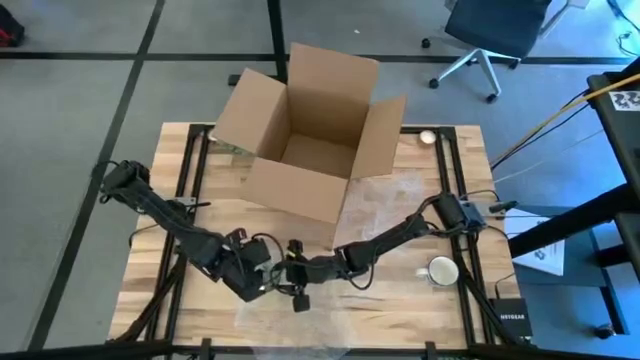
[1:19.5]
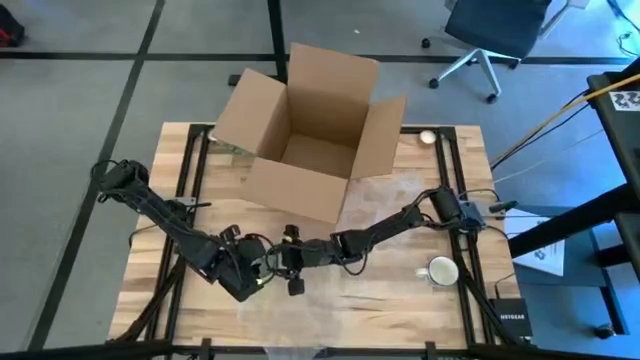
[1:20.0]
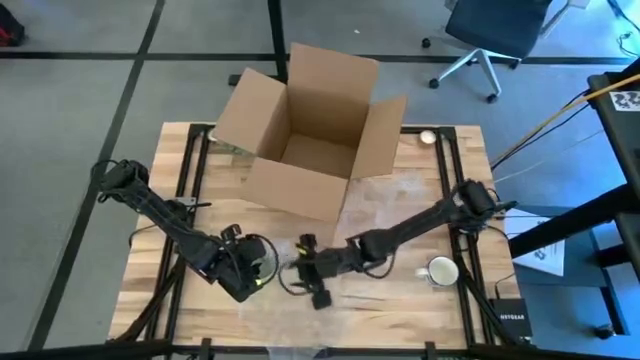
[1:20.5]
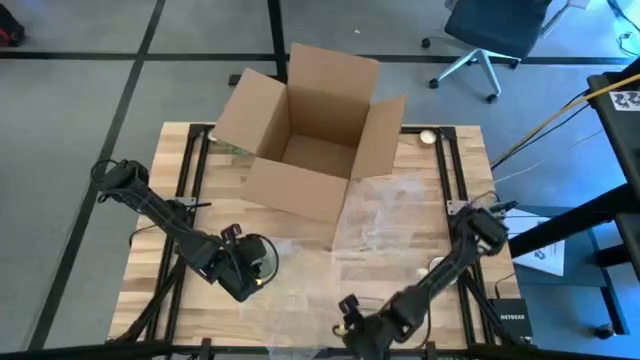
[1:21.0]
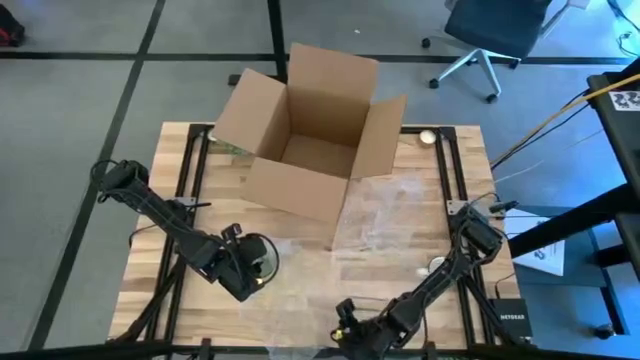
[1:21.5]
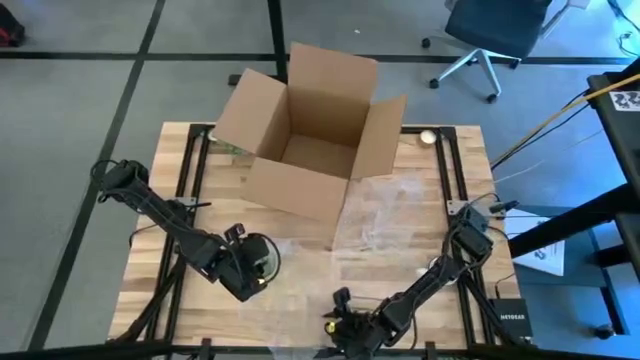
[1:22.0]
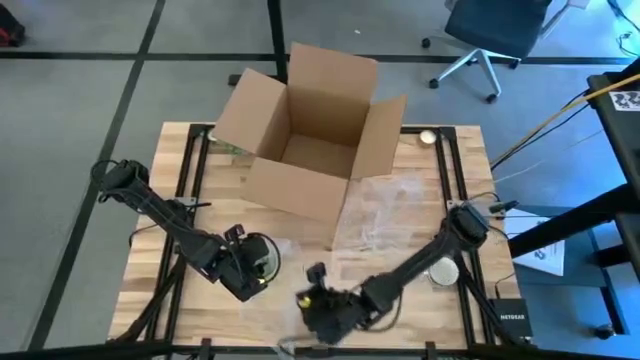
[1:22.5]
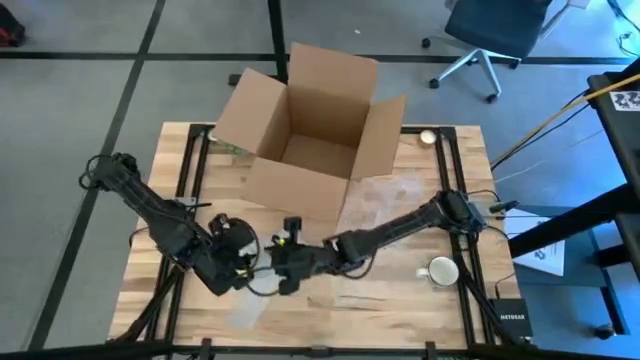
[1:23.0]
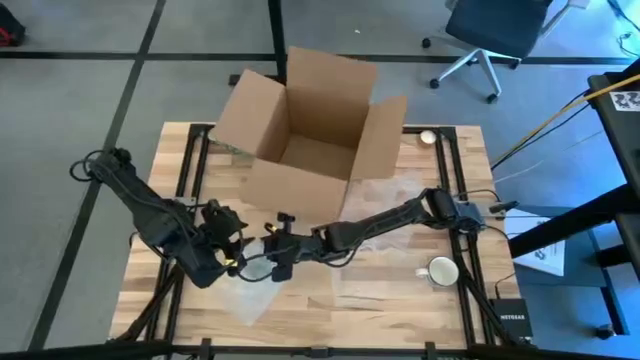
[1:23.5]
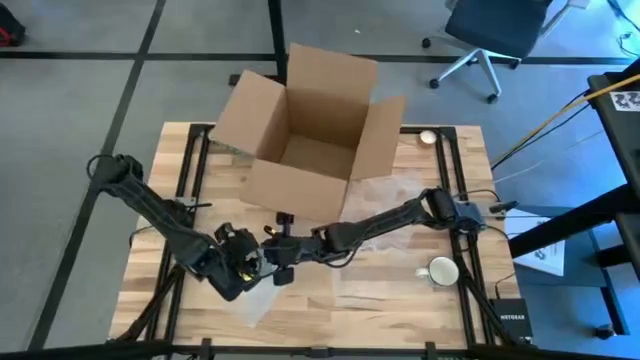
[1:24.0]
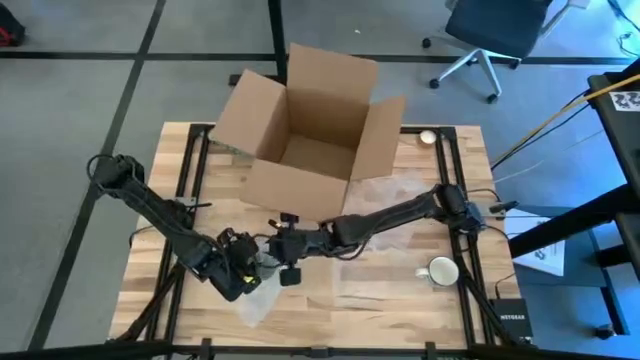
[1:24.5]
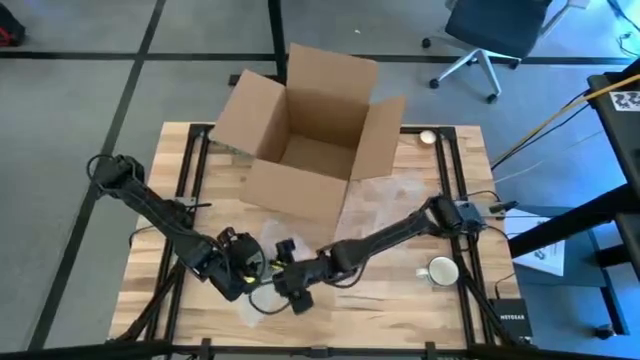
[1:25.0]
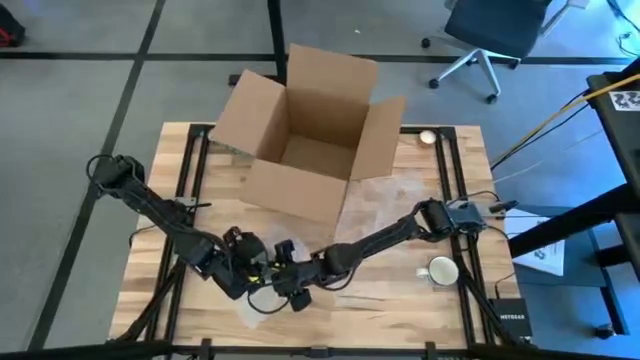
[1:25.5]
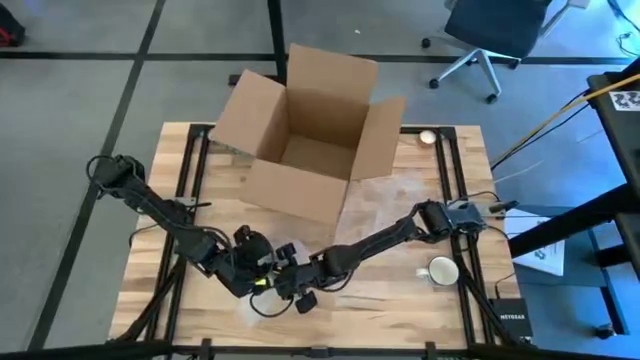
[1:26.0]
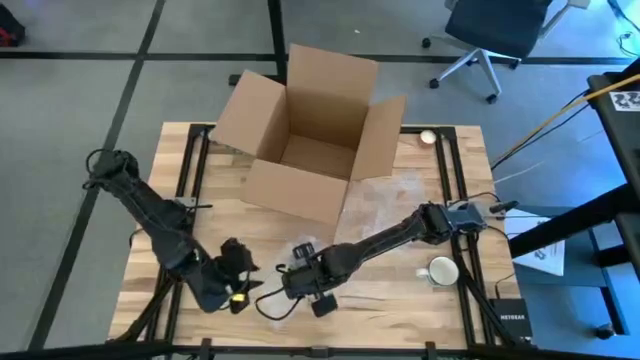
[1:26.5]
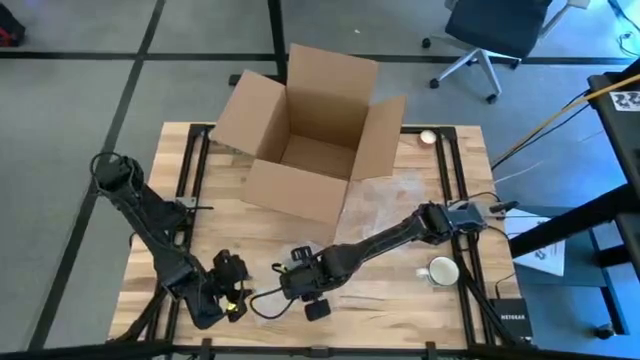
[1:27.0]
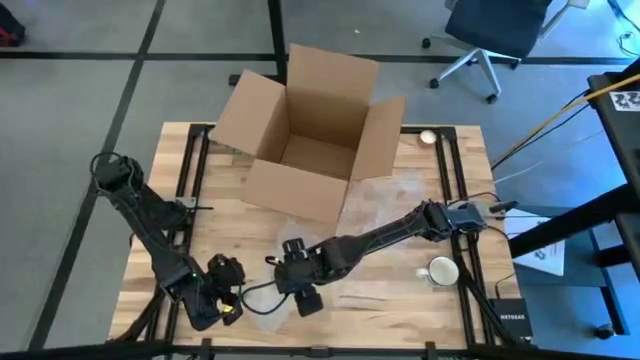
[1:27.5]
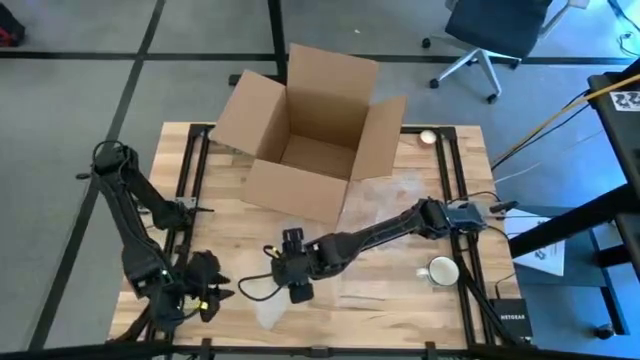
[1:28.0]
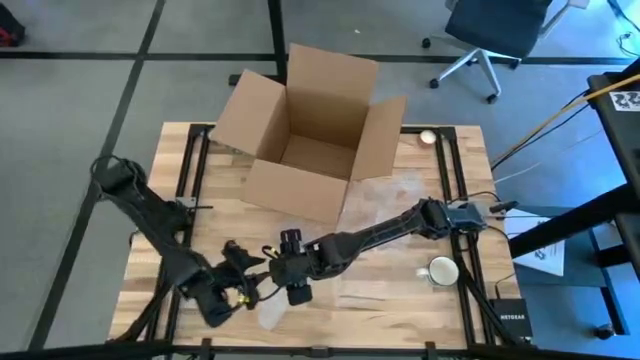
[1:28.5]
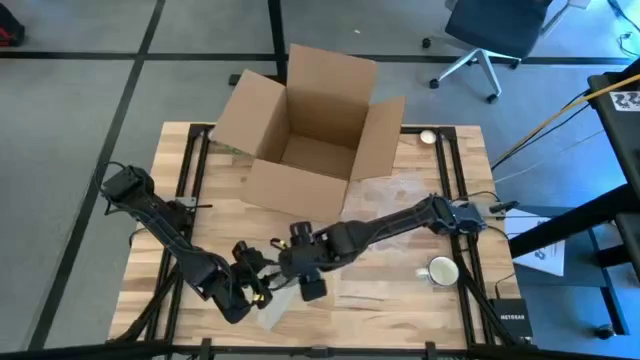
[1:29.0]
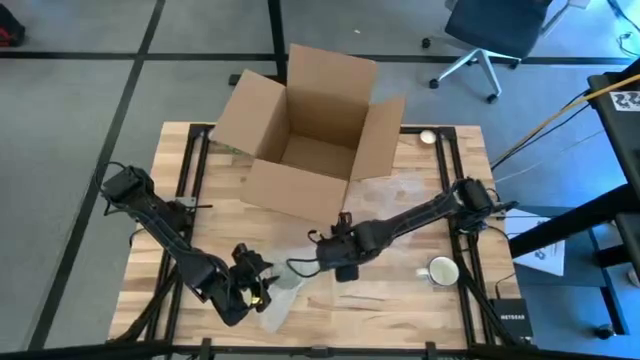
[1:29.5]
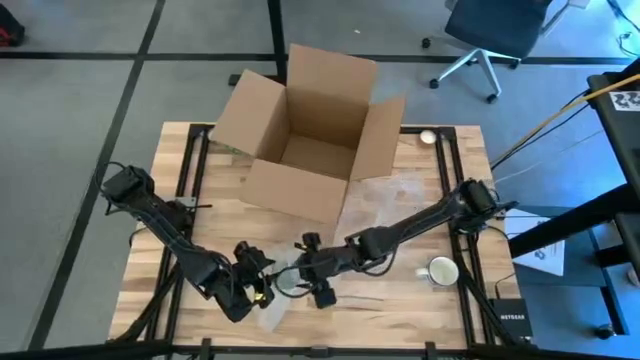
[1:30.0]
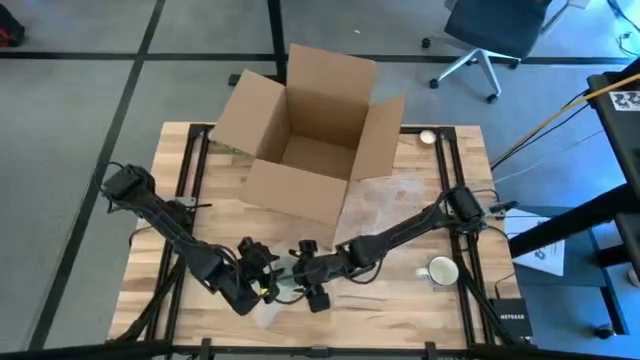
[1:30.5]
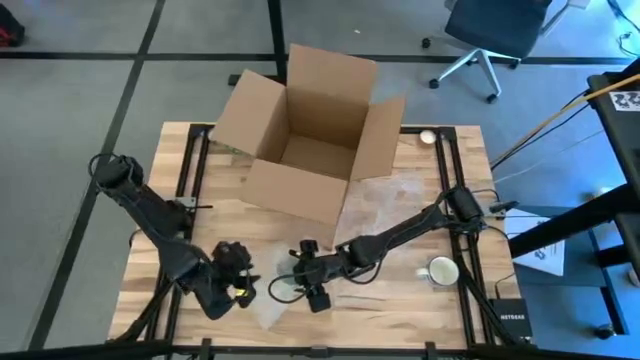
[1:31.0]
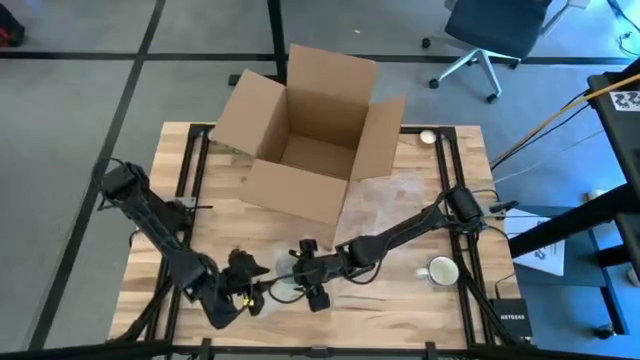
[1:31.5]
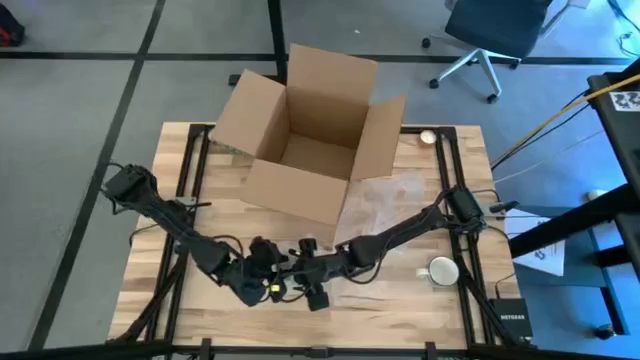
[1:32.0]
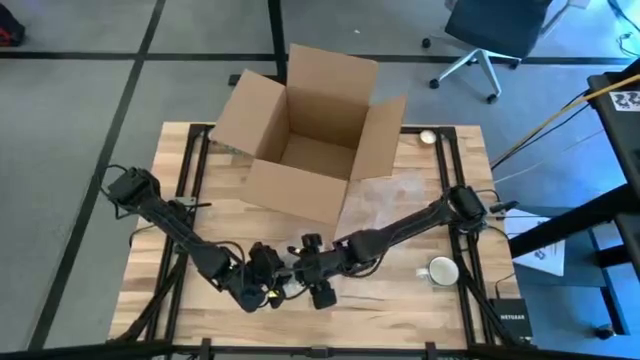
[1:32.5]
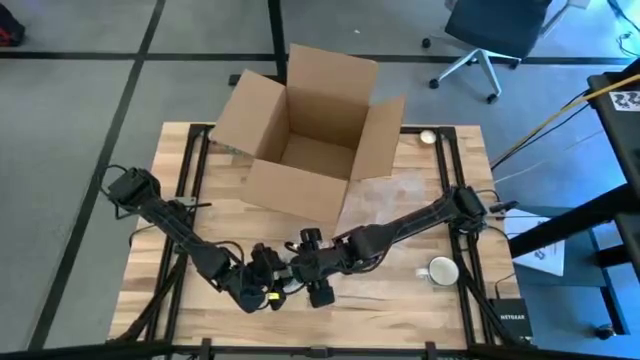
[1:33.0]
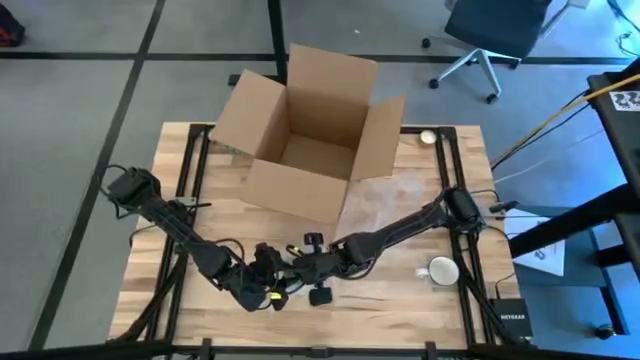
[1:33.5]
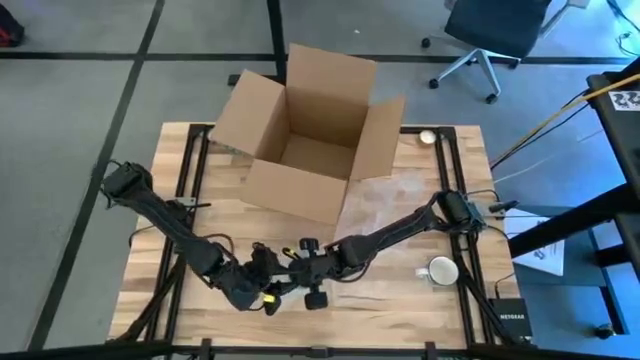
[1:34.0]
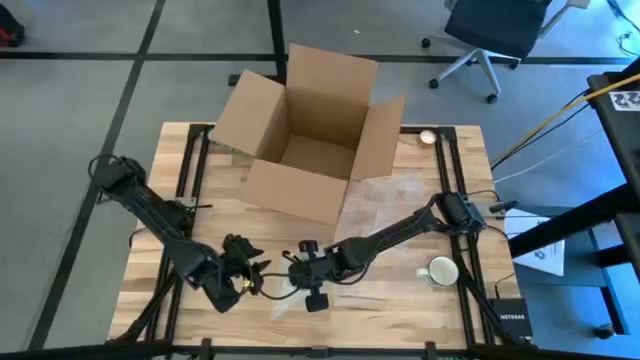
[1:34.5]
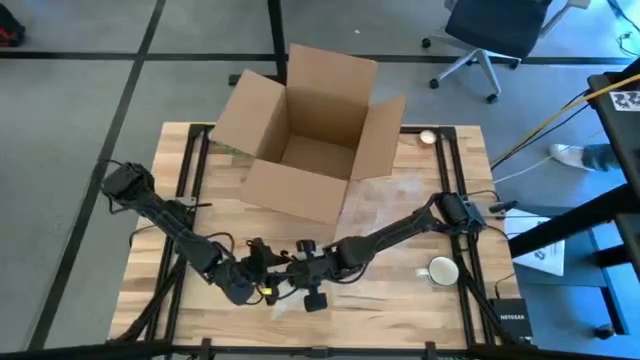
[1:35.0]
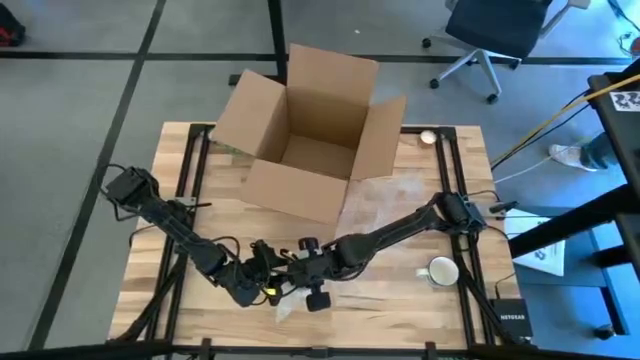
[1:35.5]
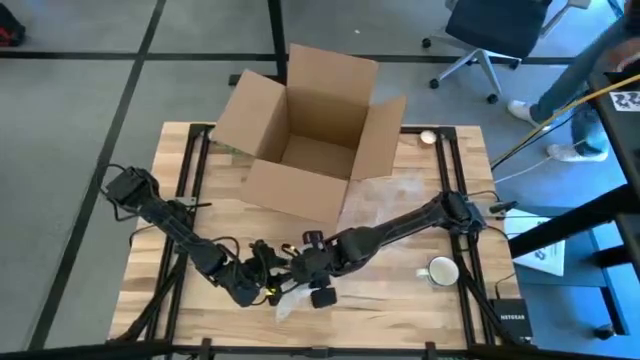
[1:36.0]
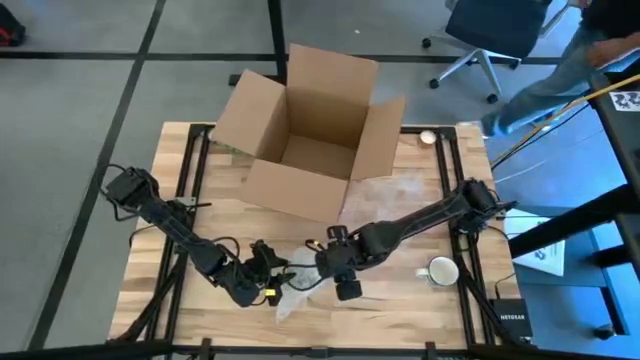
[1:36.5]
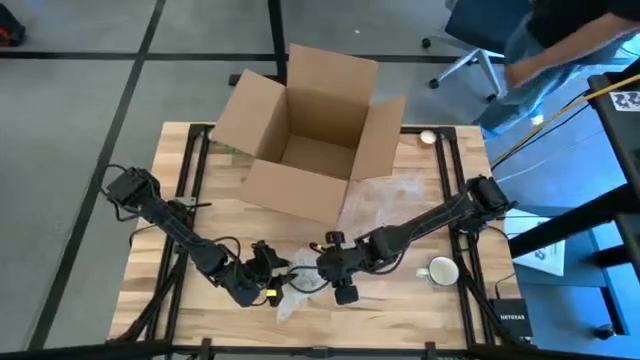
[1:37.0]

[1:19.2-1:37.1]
Task: wrap mug
Wrap the green mug with bubble wrap

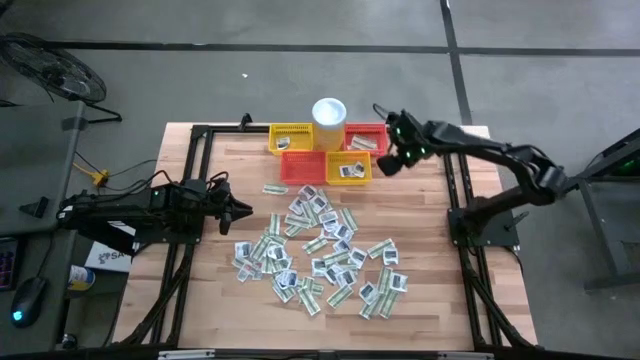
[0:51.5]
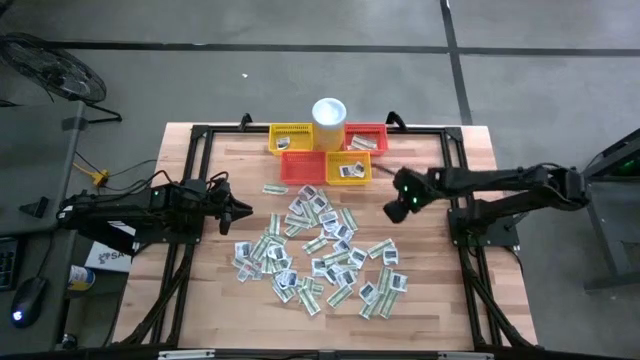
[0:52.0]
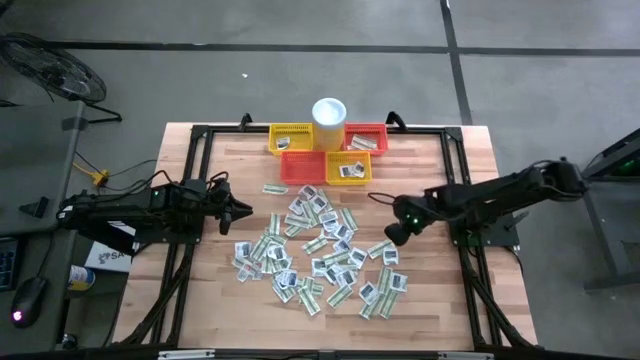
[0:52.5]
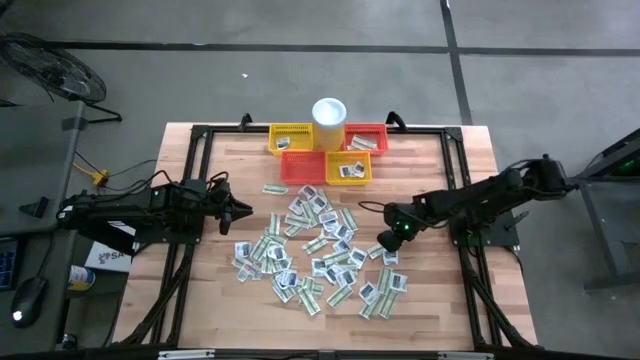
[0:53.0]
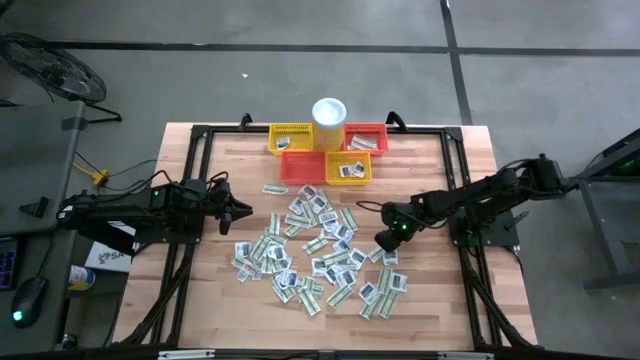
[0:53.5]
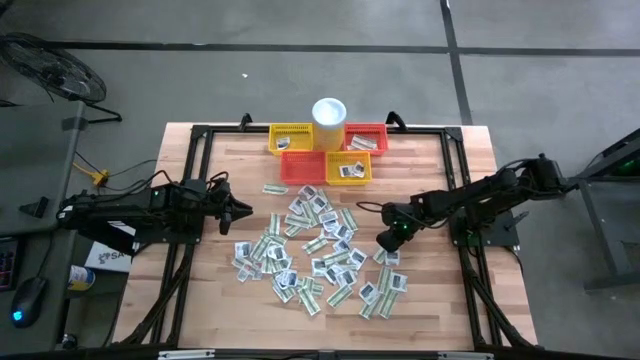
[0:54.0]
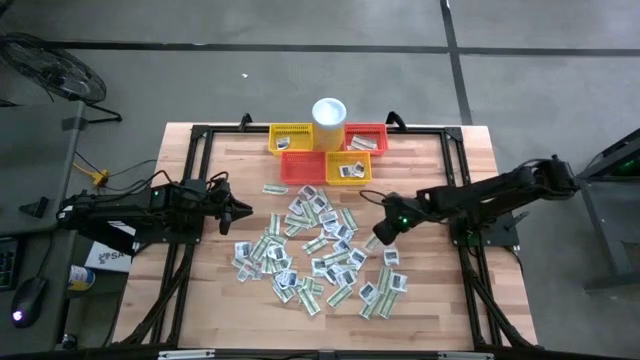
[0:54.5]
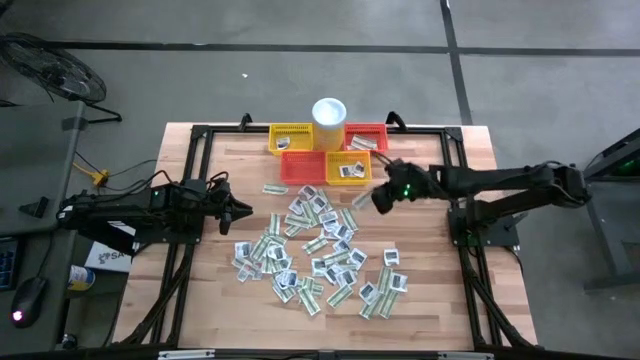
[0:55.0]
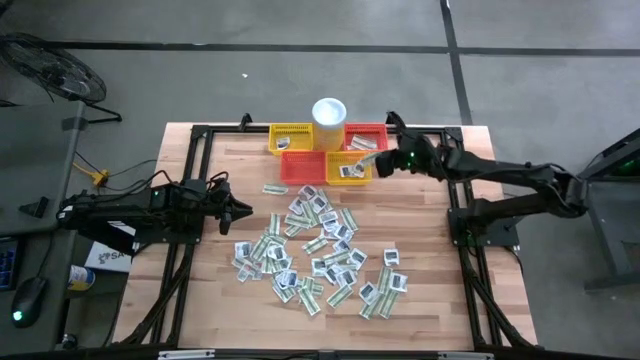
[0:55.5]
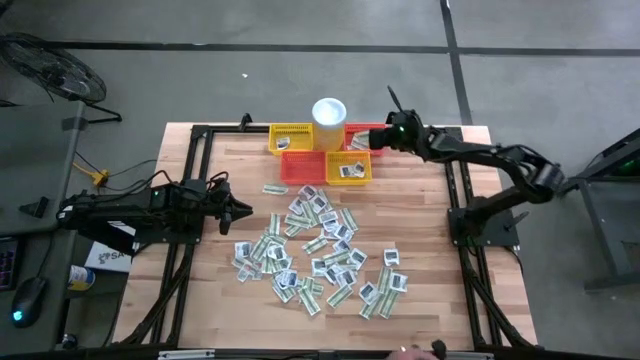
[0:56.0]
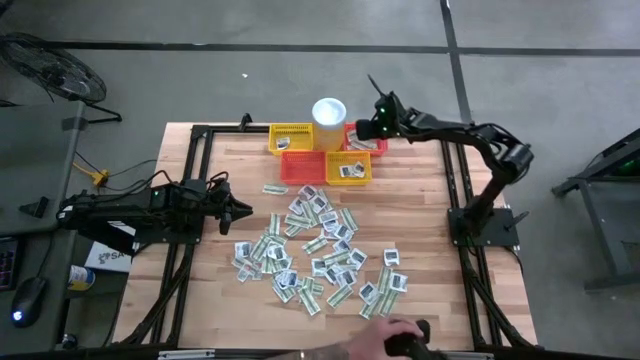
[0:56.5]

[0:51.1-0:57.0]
Task: Pick & Place First Aid Supplies
Put the green bandage pack into the top orange basket
